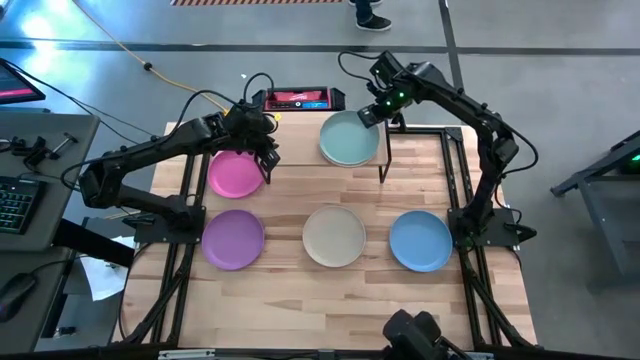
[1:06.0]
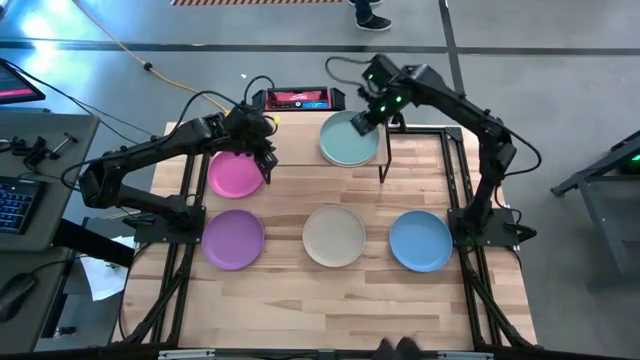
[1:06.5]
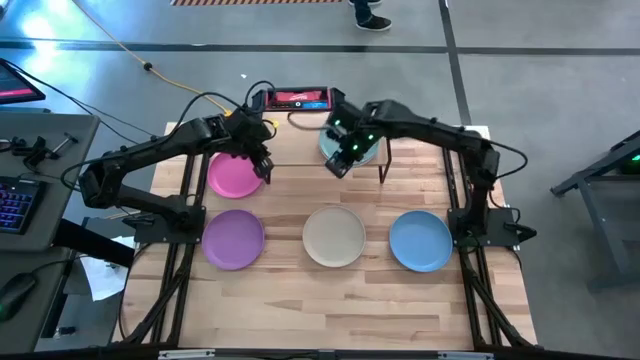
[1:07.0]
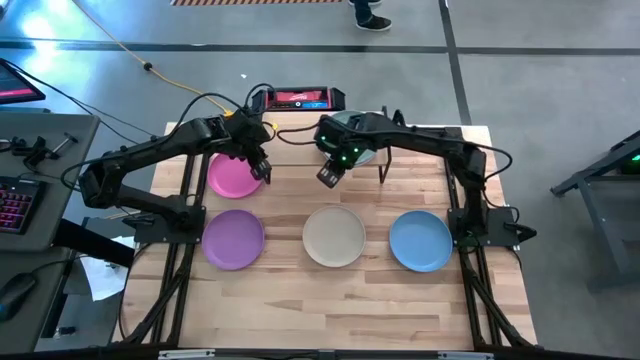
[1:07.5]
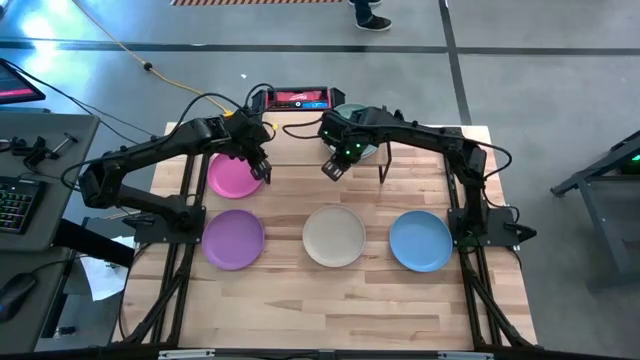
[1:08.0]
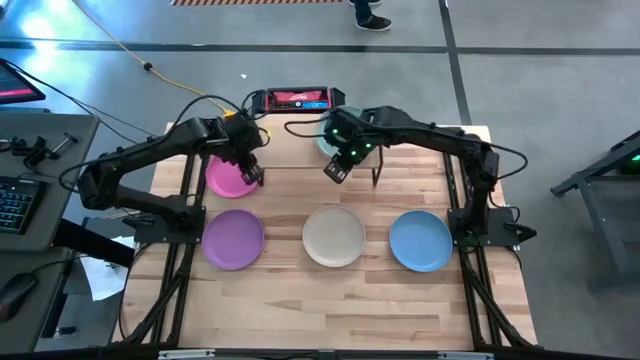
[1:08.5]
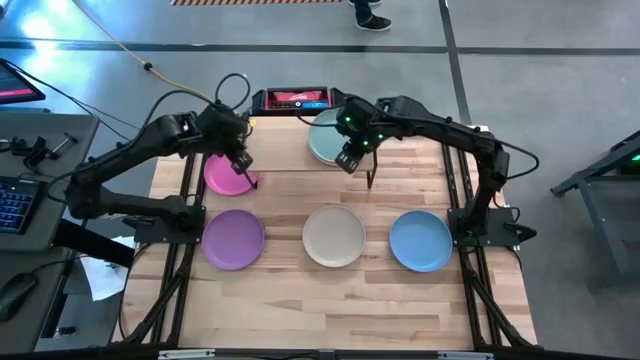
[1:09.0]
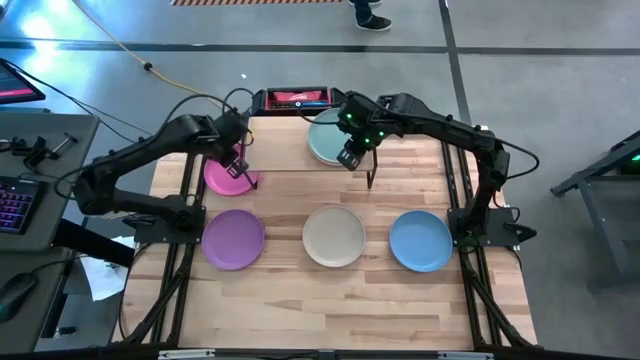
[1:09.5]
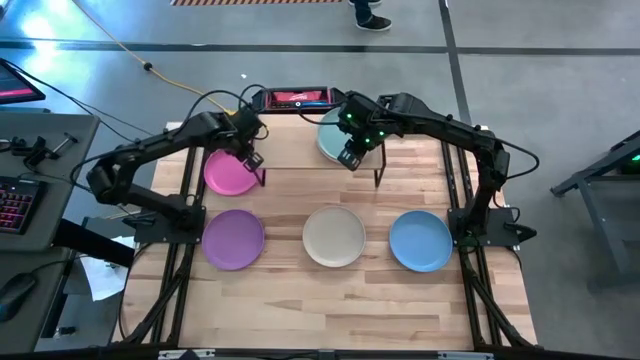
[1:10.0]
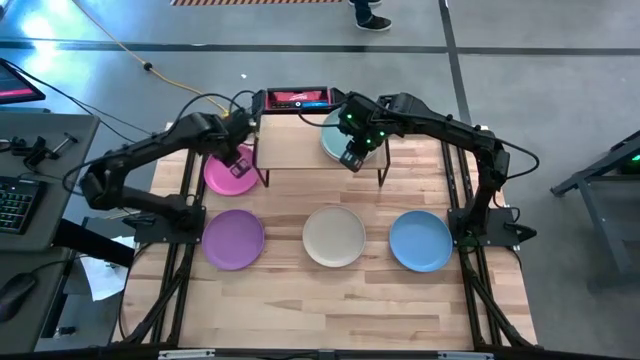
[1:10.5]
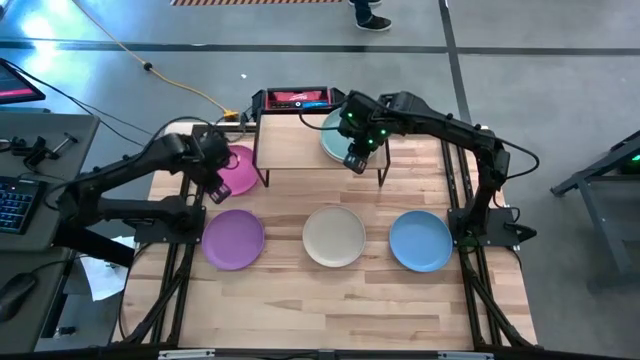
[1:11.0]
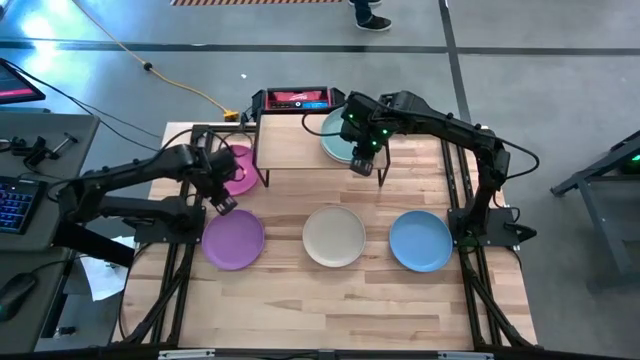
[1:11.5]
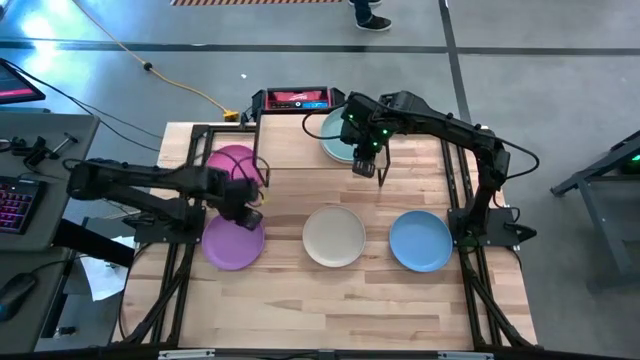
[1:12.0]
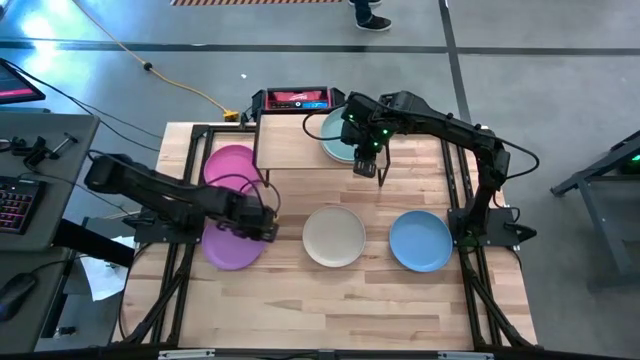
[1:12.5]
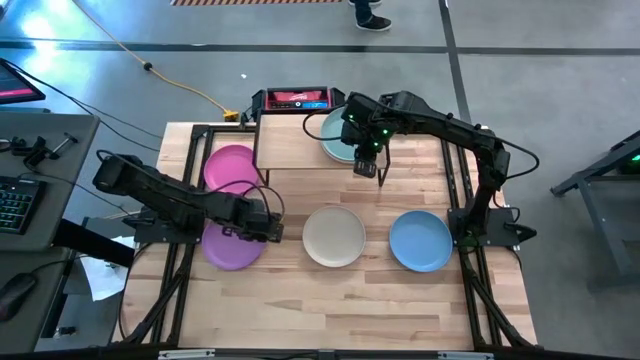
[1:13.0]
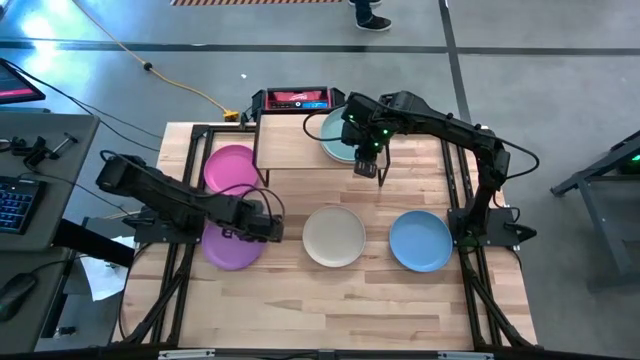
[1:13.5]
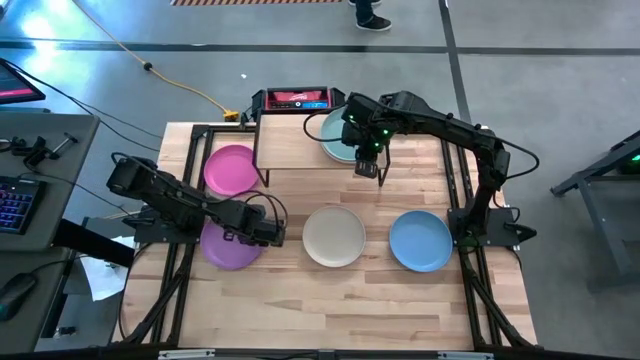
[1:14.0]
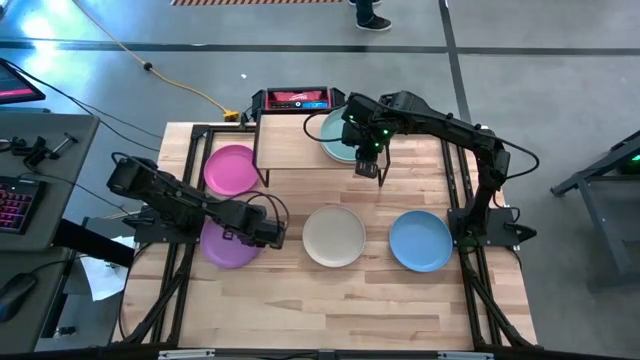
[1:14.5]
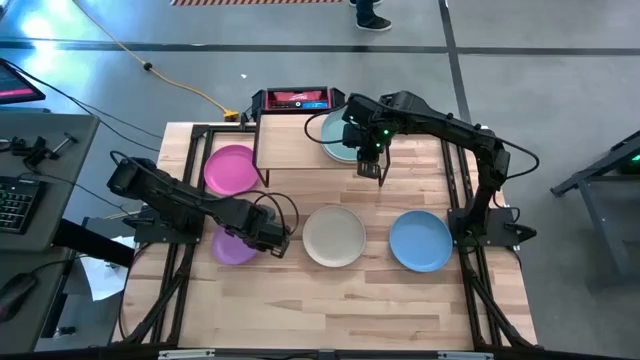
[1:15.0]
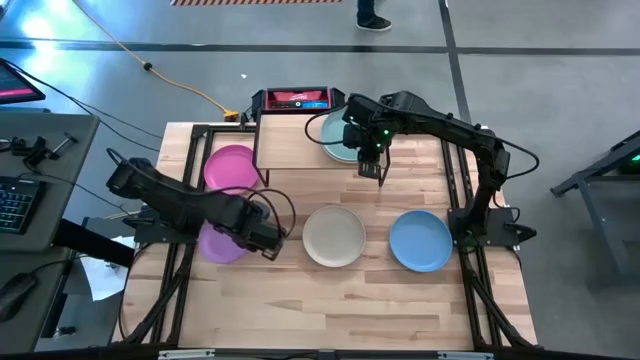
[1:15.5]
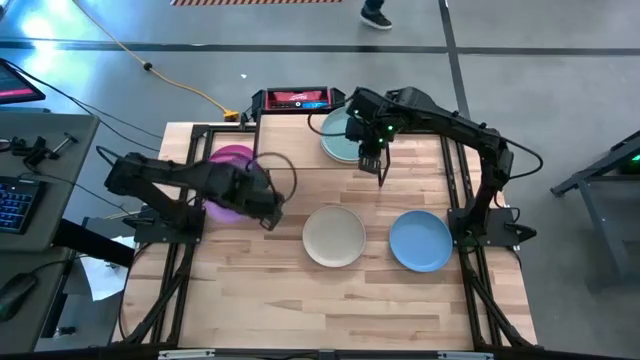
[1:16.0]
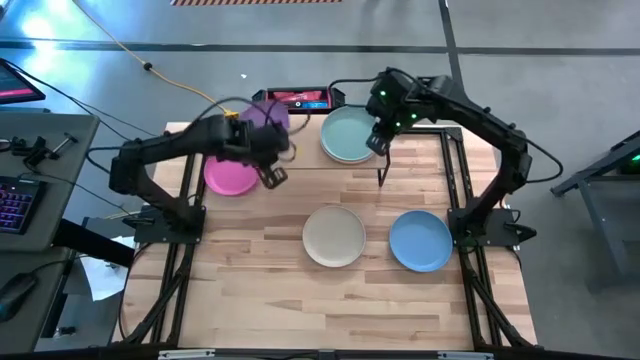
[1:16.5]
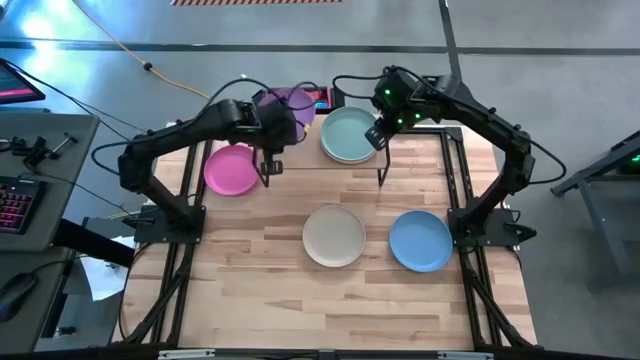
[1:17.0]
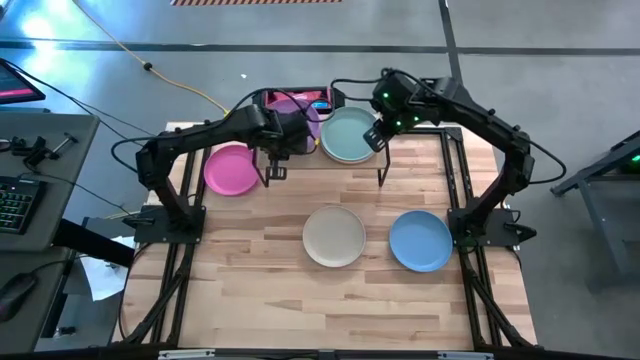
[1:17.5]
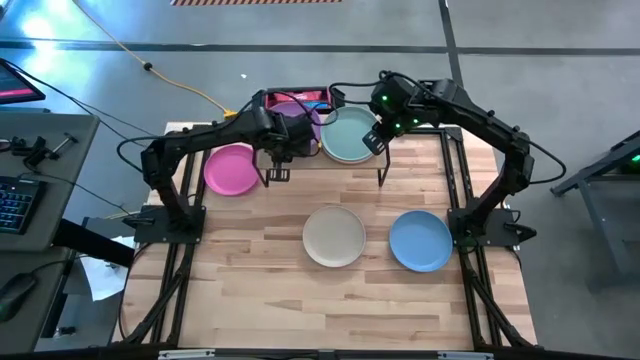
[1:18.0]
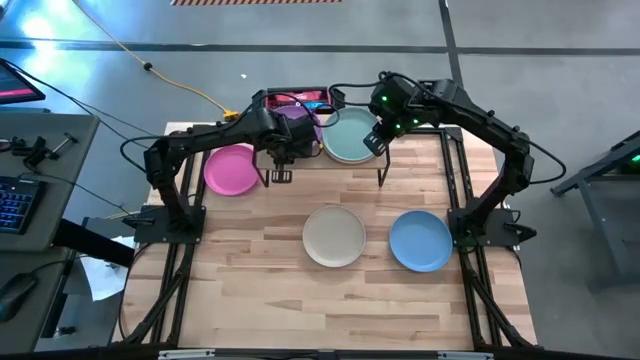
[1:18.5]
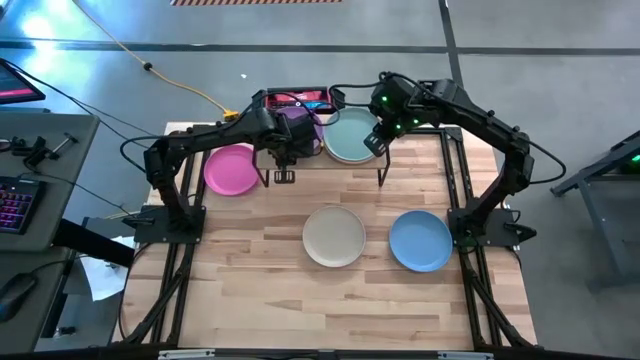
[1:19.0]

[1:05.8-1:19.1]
Task: Place and stack plates onto a shelf
Put the purple plate on the shelf

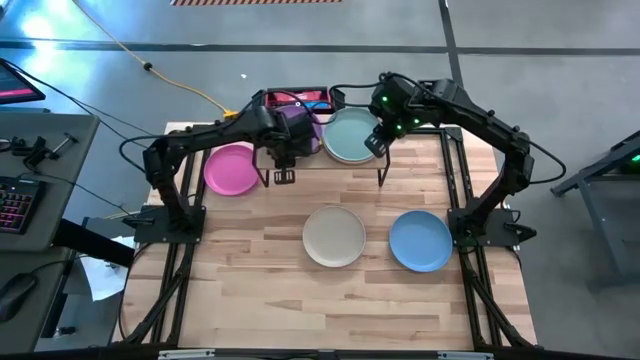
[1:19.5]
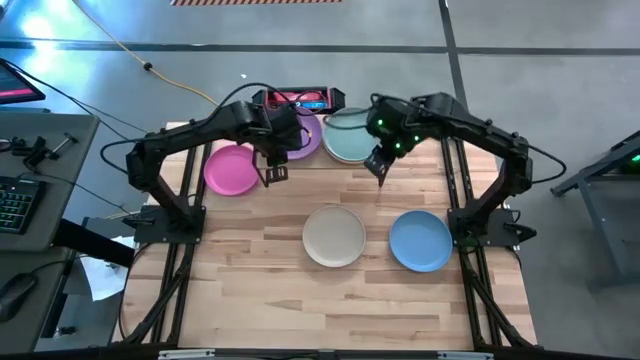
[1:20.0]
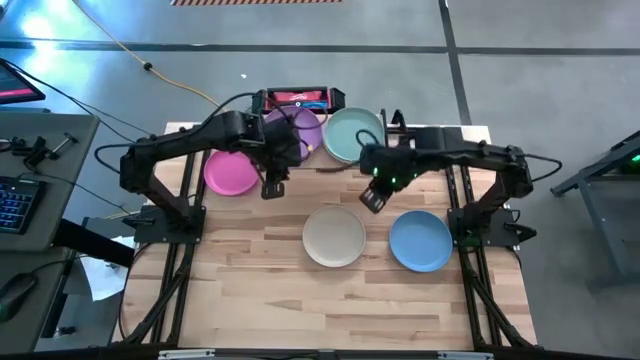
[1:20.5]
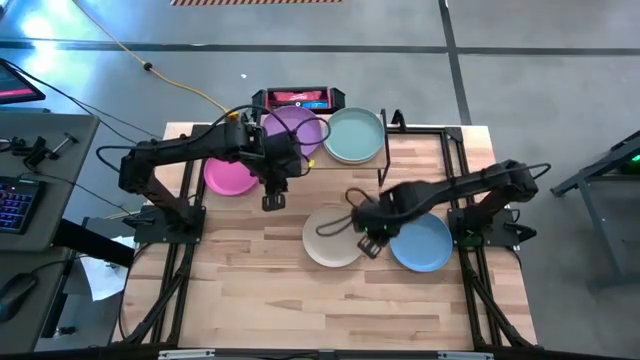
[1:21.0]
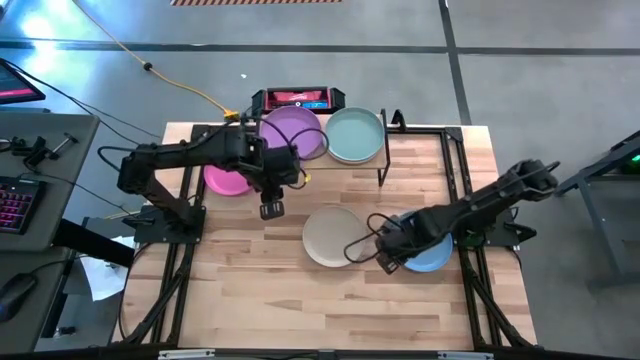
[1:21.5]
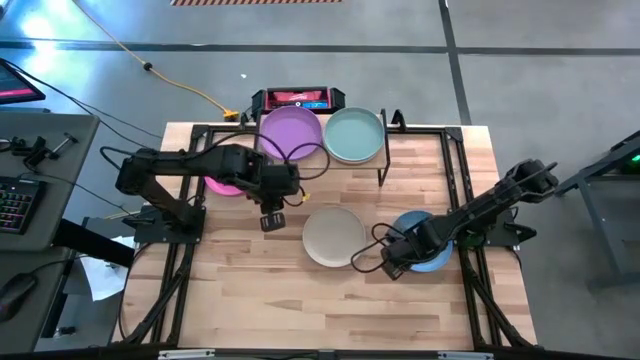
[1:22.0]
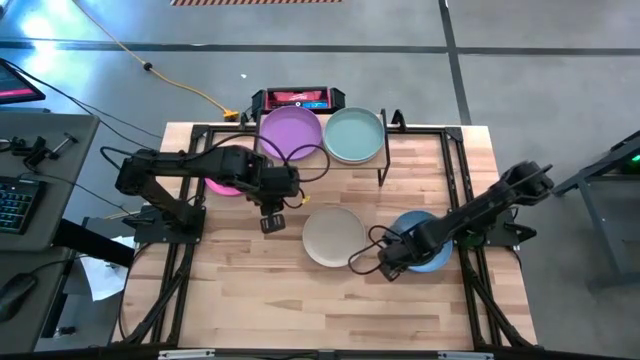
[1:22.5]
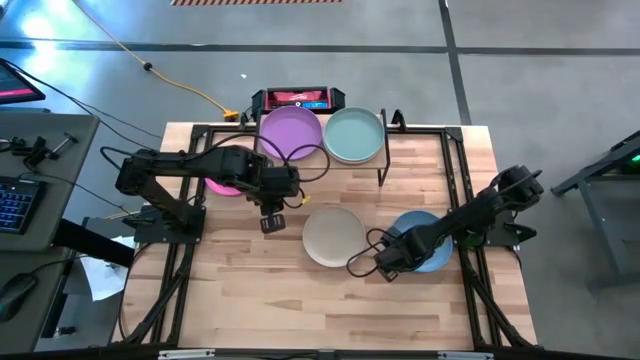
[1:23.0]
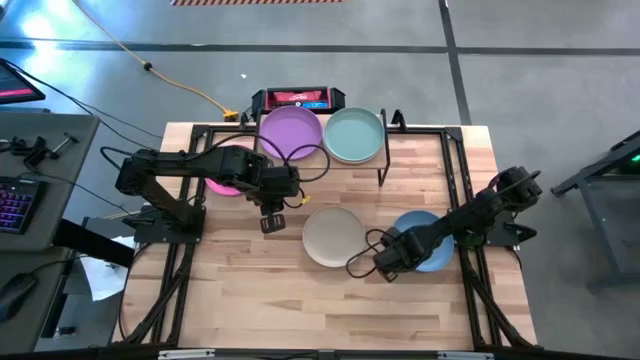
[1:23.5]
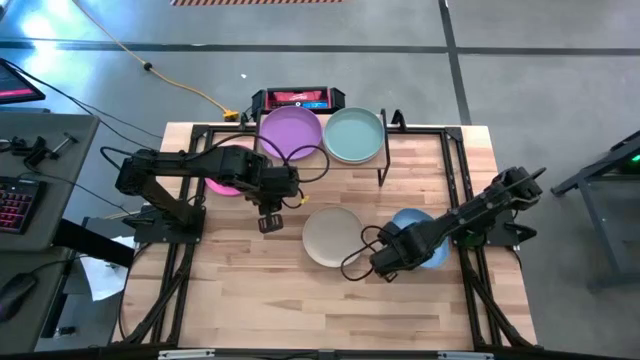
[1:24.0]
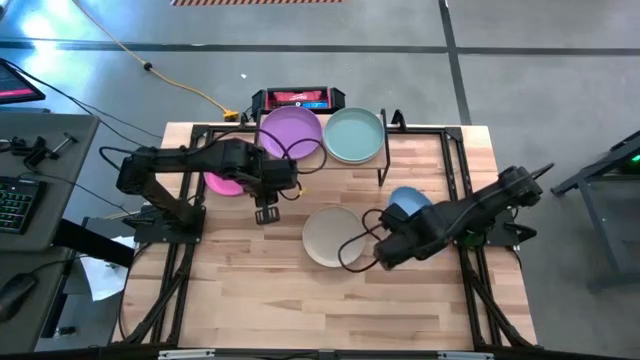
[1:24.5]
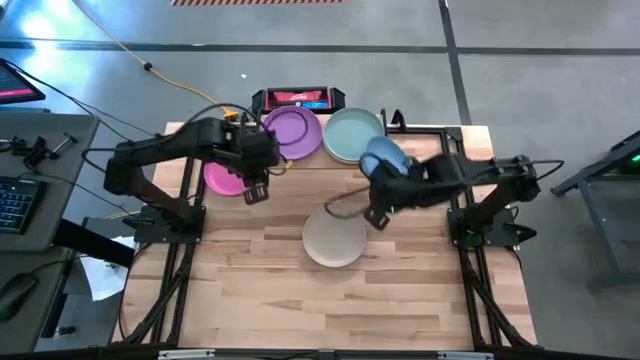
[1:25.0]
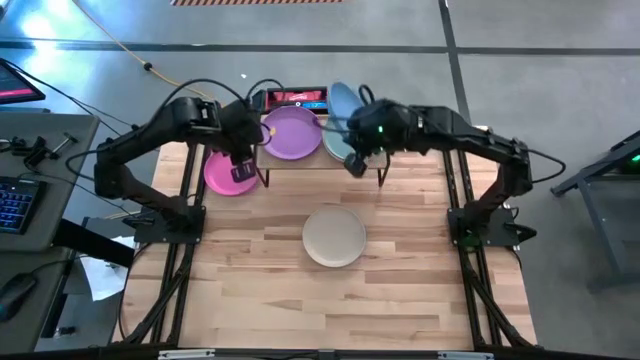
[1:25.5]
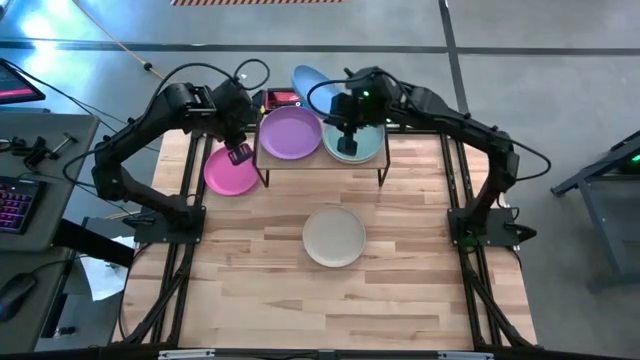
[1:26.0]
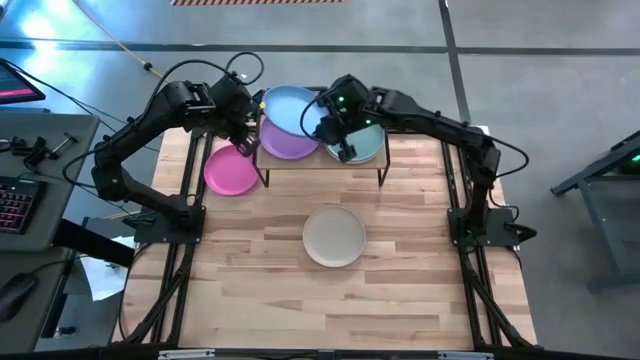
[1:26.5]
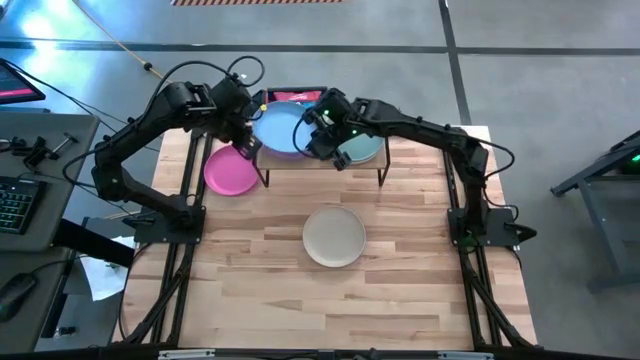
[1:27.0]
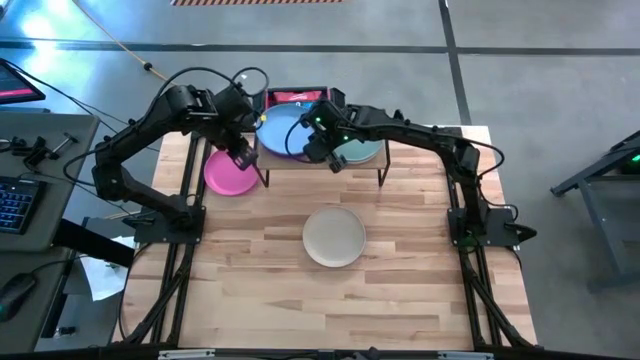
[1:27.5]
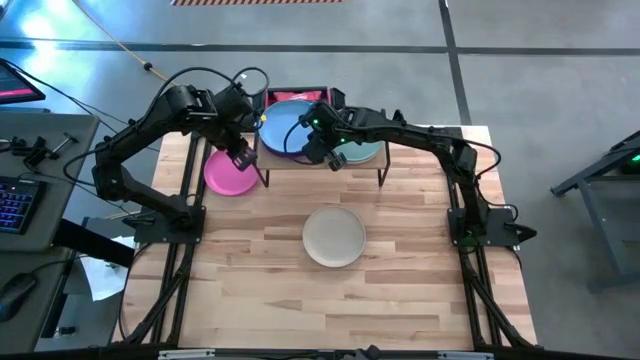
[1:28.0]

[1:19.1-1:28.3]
Stack the blue plate on top of the purple plate on the shelf
